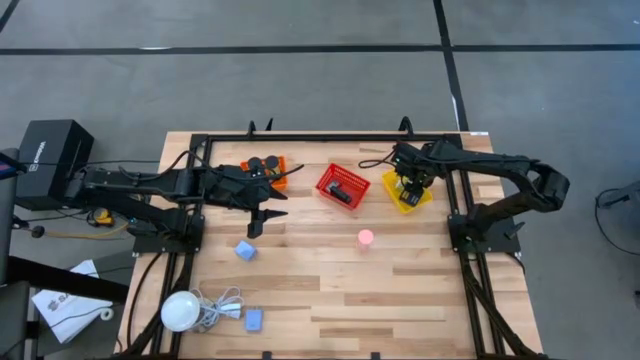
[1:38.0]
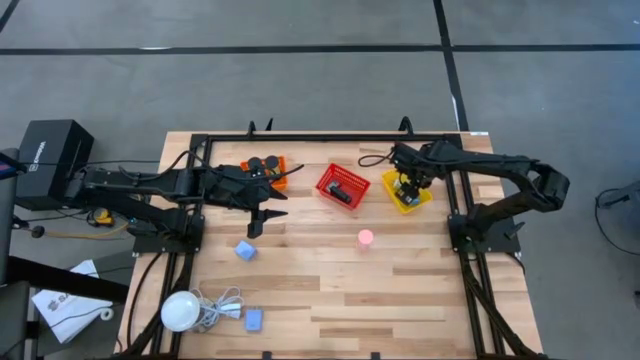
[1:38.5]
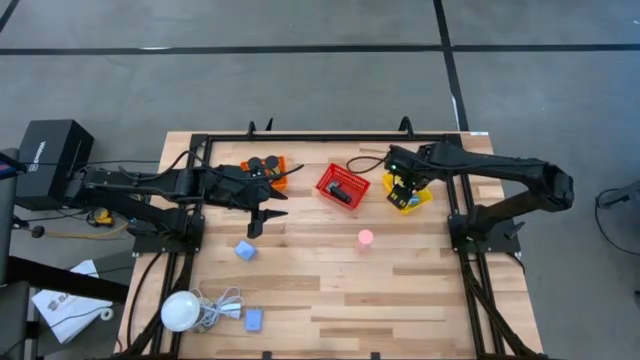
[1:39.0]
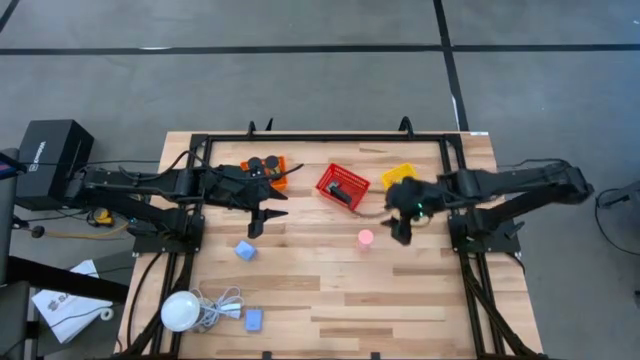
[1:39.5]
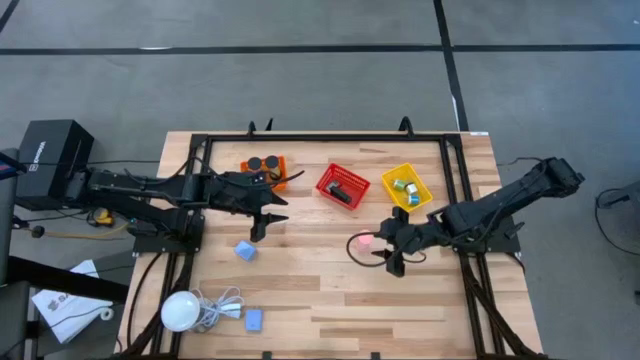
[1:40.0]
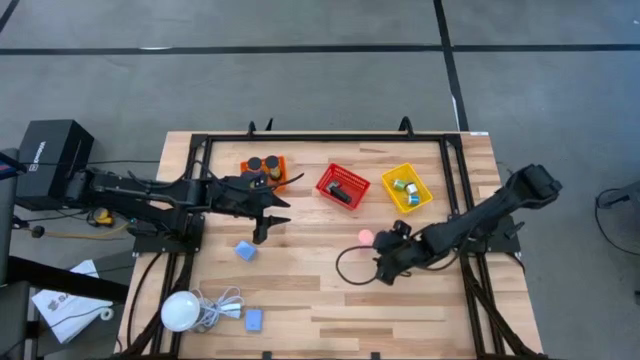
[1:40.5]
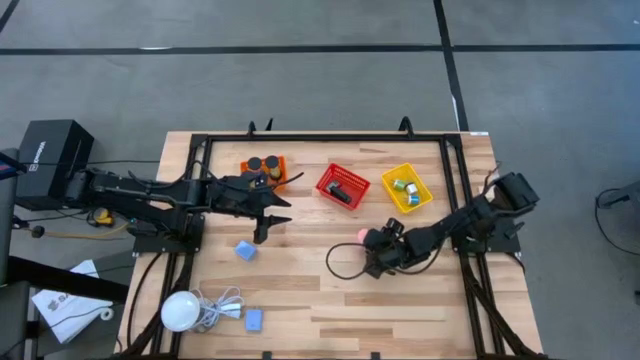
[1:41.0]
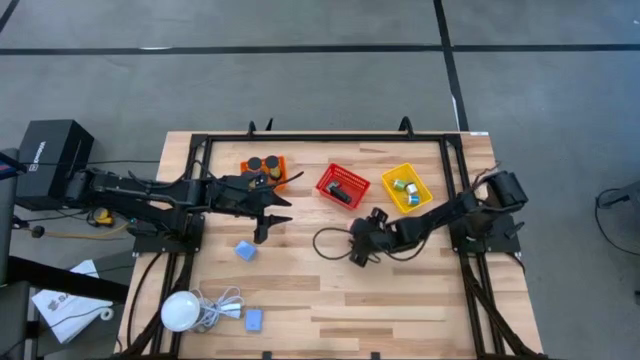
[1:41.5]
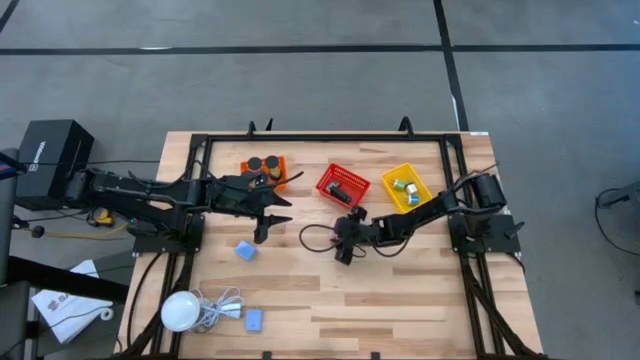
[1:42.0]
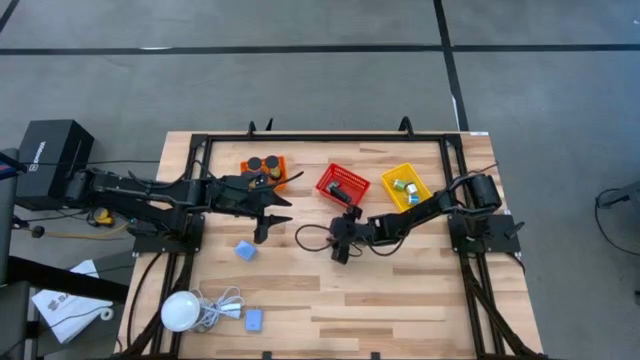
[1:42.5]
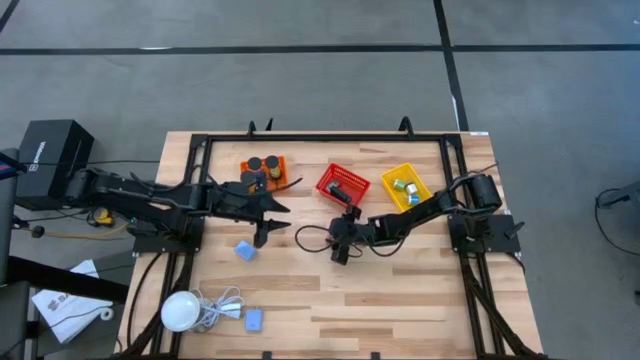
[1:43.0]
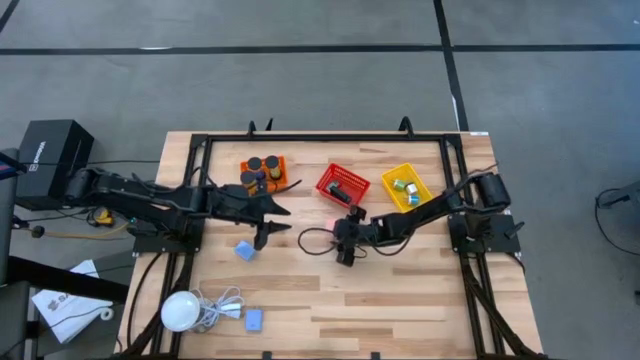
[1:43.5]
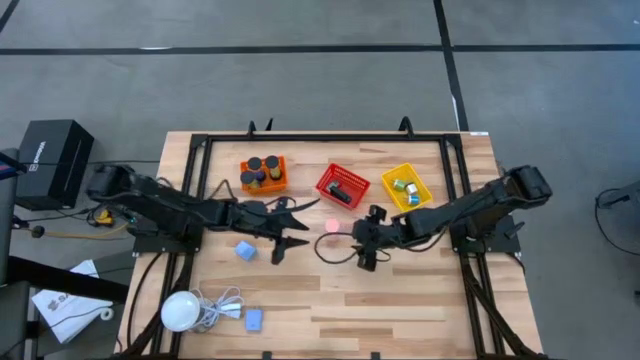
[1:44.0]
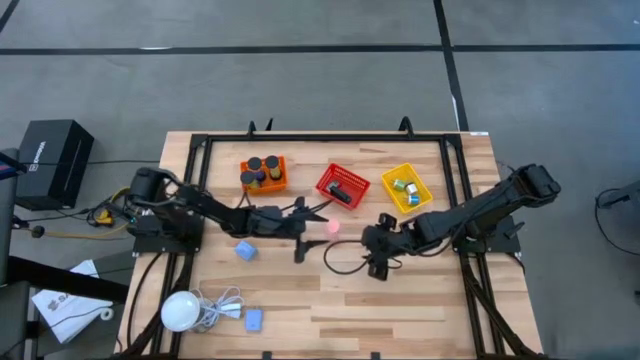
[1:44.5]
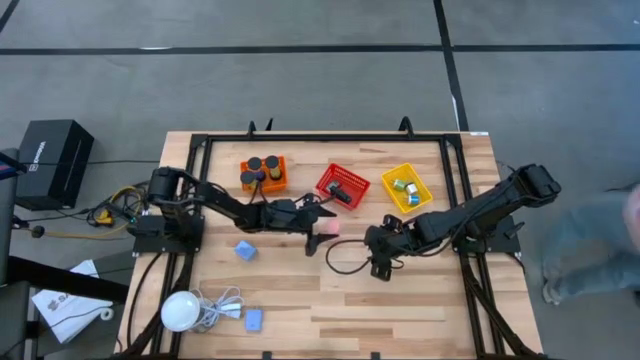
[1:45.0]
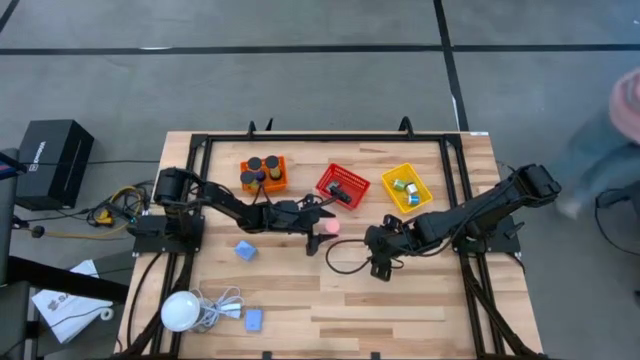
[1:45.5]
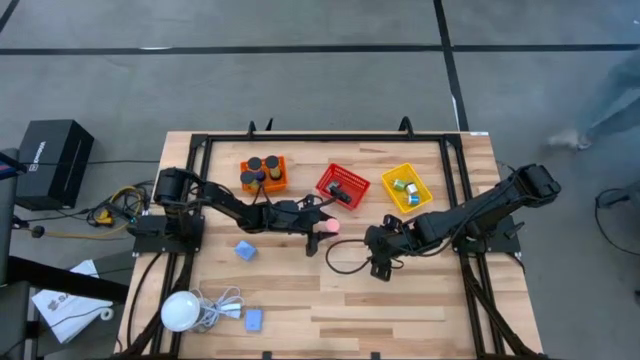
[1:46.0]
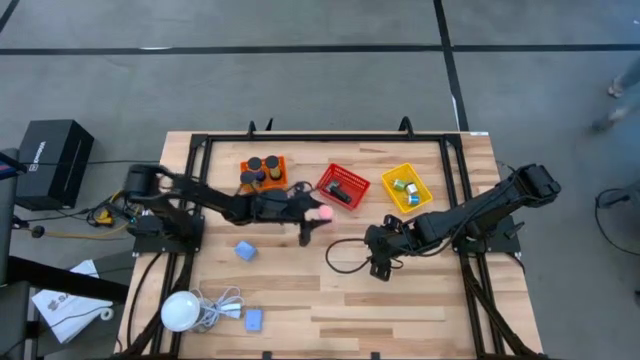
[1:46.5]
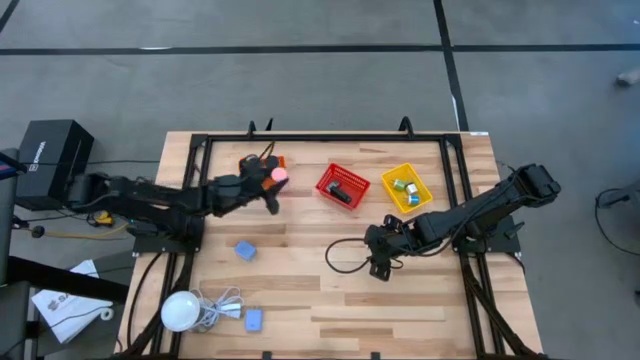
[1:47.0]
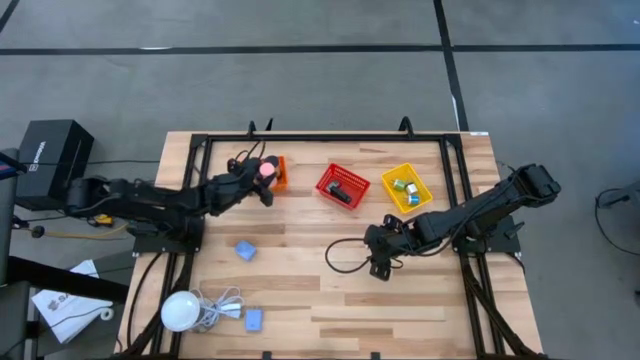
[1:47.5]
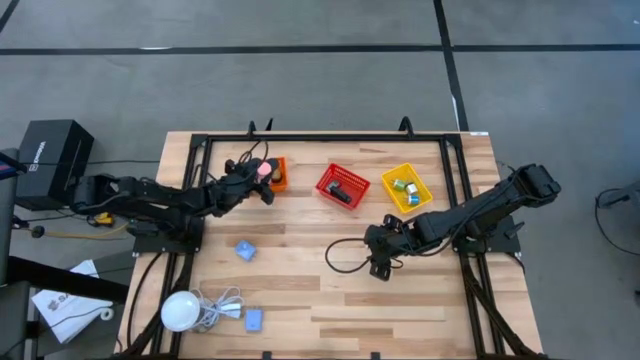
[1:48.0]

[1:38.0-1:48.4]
Task: Pick & Place Office items
Put the pink hourglass into the orange bin

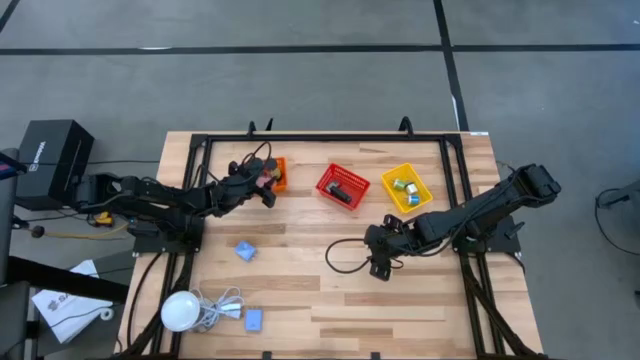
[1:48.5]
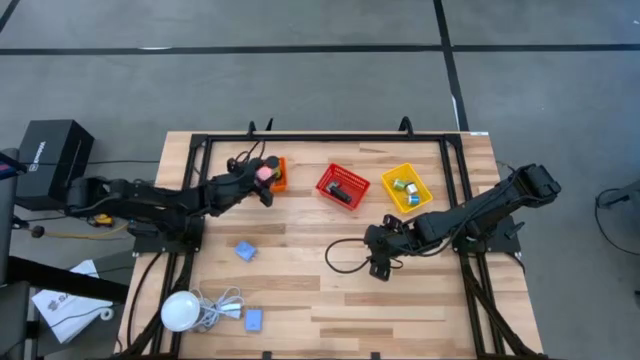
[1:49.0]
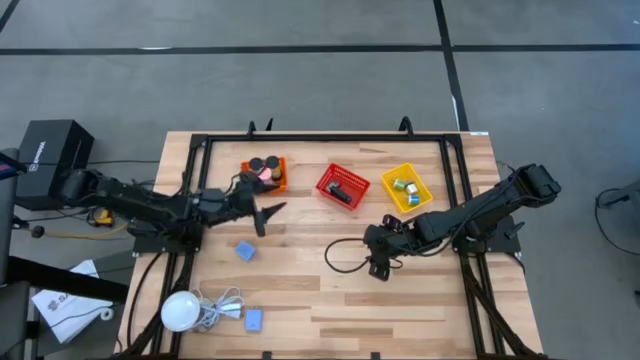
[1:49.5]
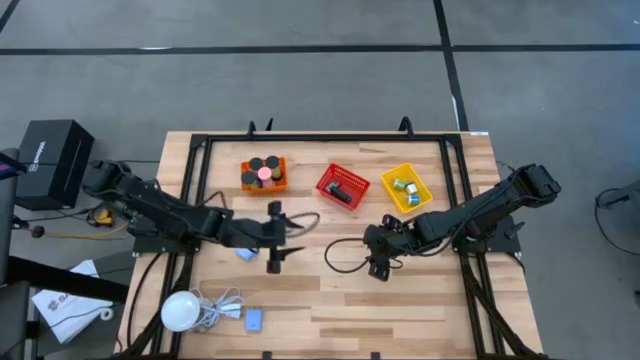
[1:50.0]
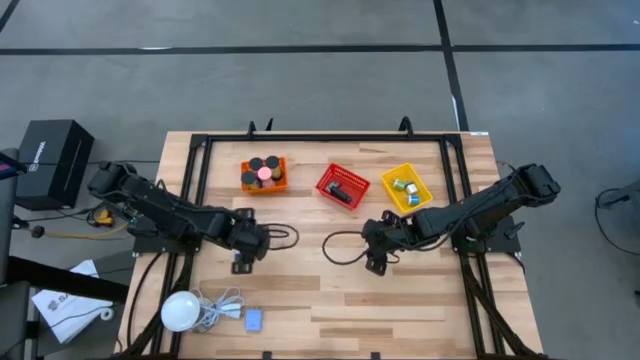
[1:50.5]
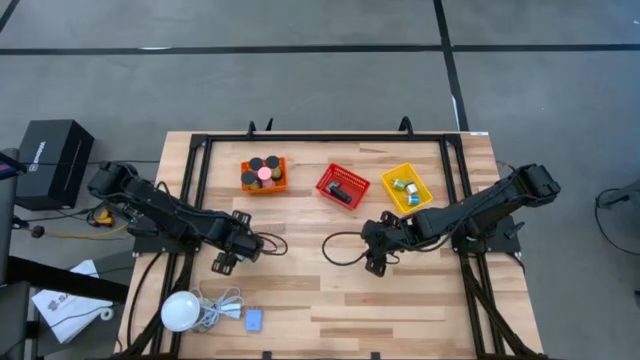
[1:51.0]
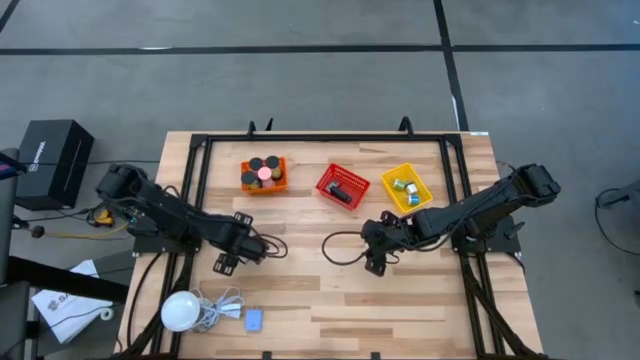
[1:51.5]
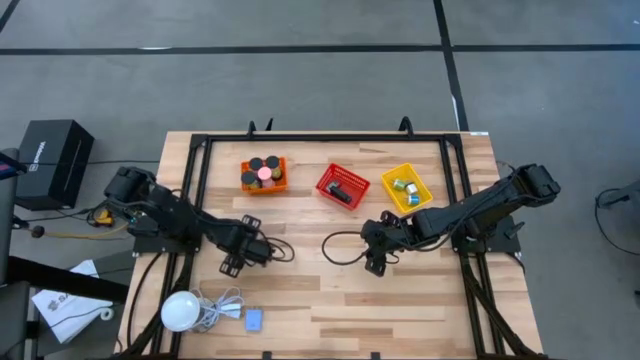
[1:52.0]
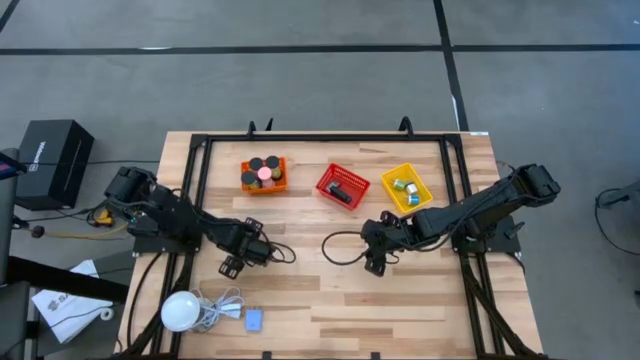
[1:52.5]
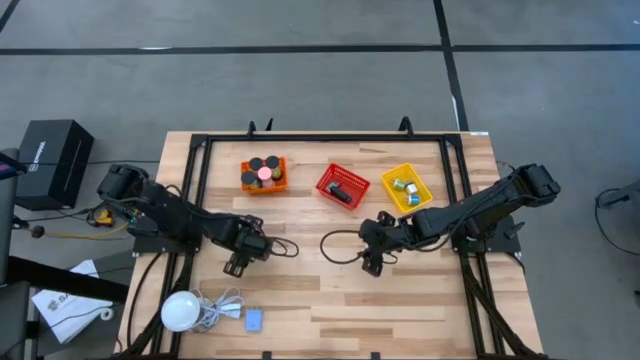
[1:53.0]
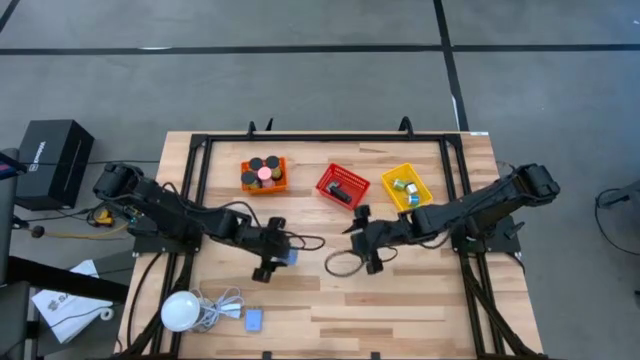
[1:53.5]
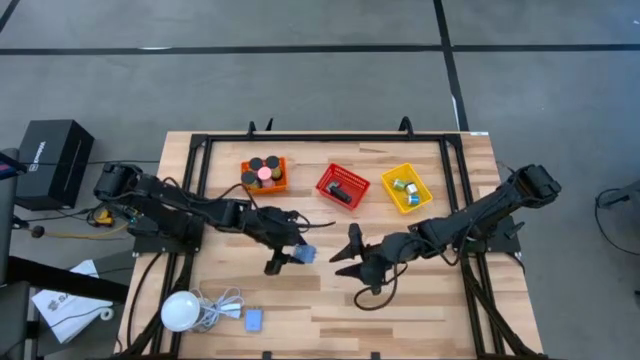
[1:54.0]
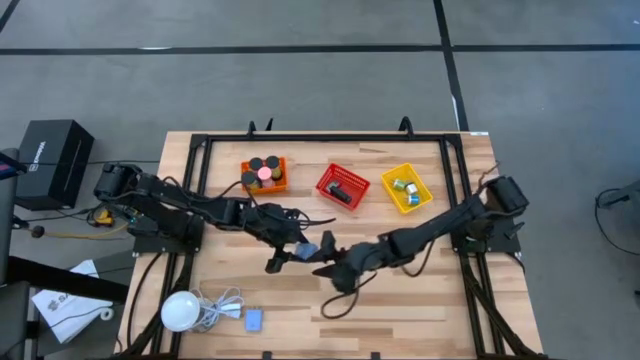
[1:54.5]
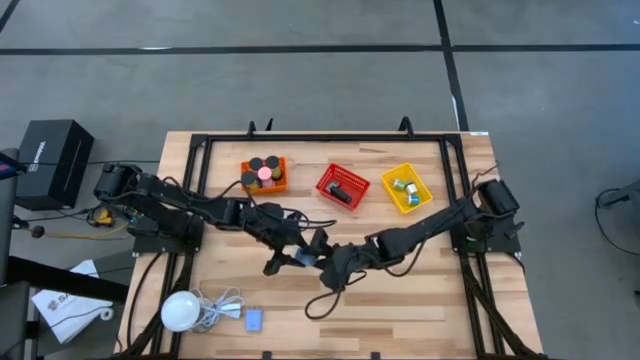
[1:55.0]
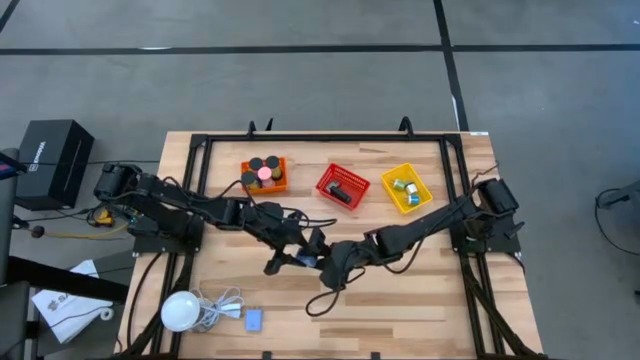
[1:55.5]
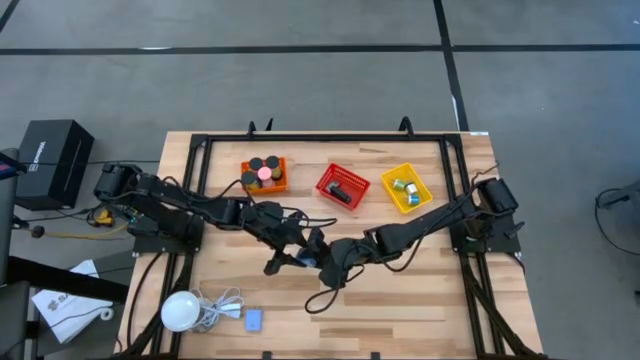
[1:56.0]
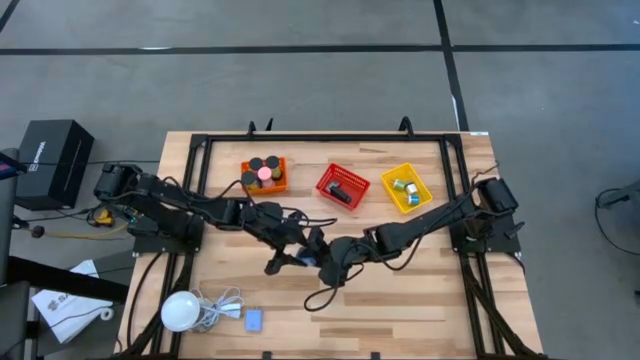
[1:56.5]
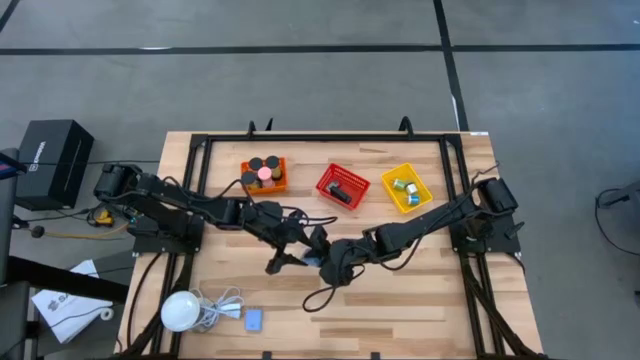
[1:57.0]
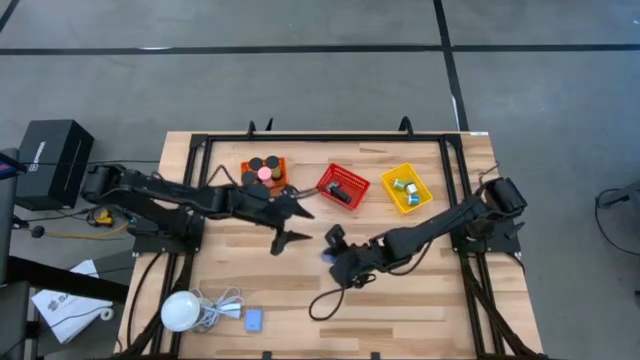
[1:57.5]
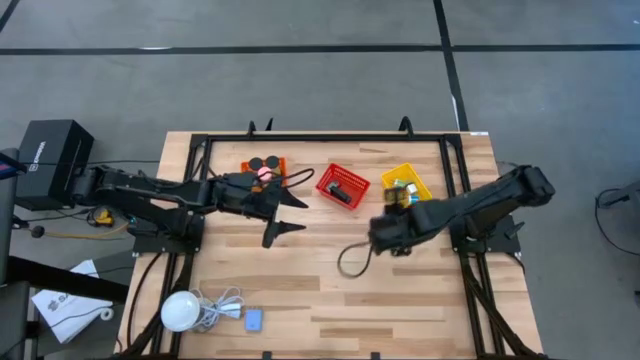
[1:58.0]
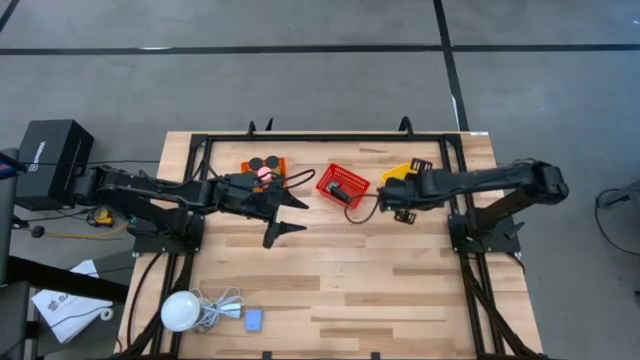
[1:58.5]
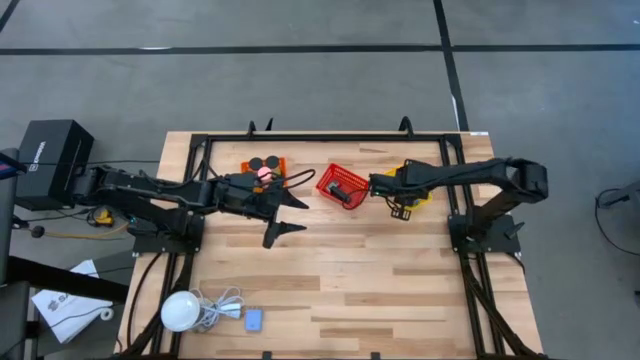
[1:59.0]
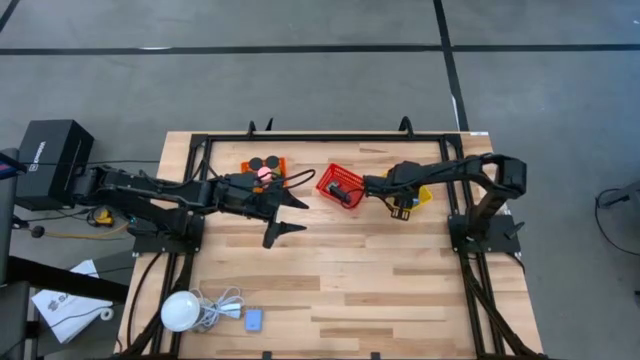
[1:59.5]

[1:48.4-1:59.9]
Put the top light blue charger adapter into the yellow bin
